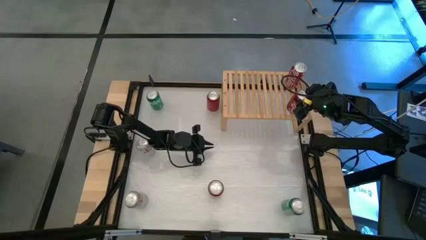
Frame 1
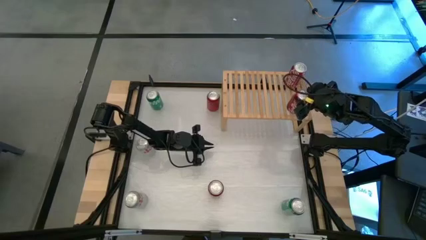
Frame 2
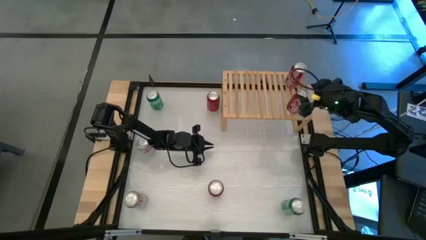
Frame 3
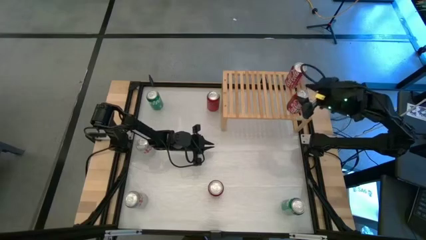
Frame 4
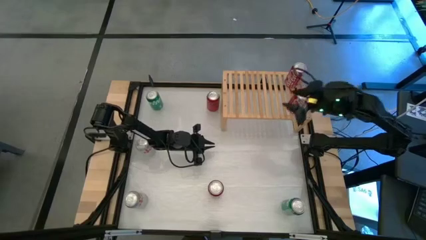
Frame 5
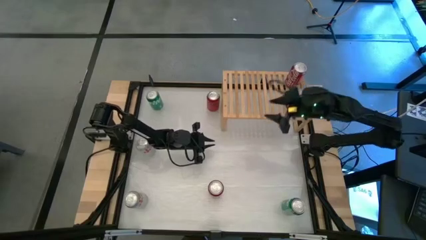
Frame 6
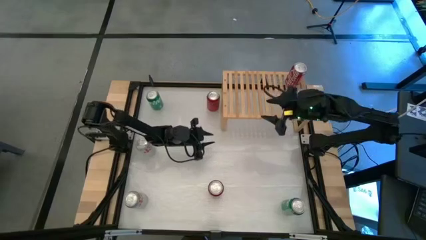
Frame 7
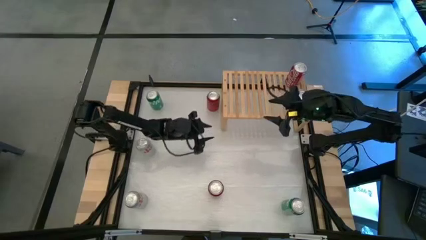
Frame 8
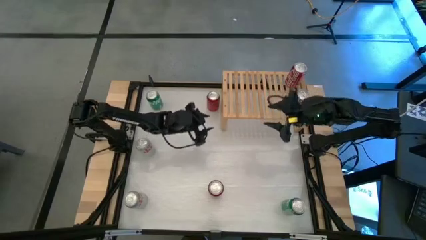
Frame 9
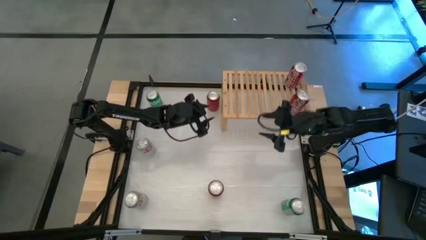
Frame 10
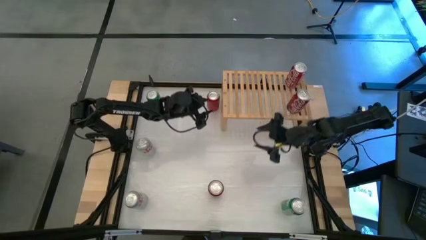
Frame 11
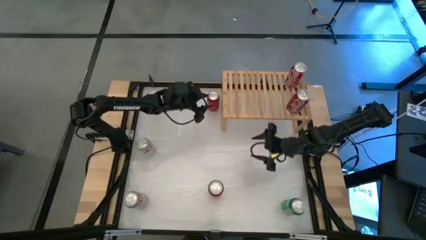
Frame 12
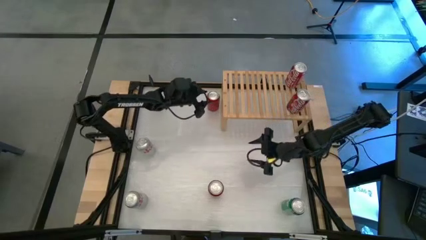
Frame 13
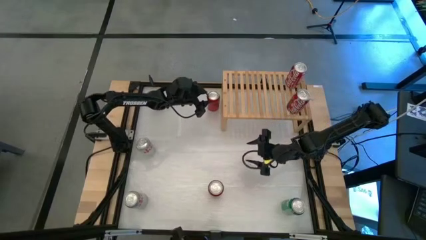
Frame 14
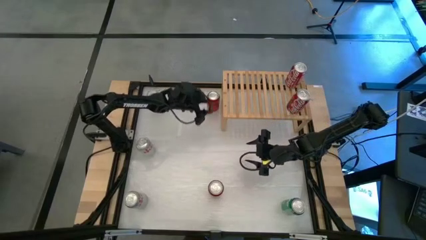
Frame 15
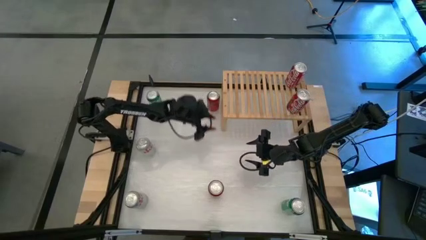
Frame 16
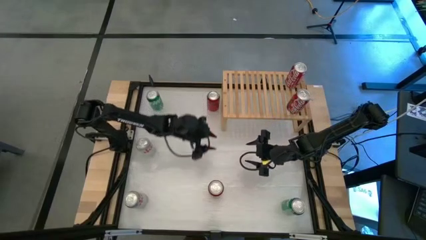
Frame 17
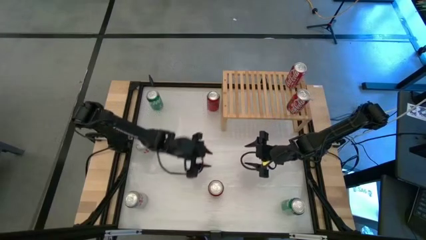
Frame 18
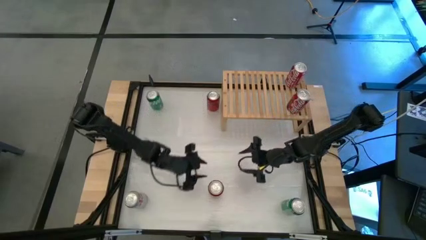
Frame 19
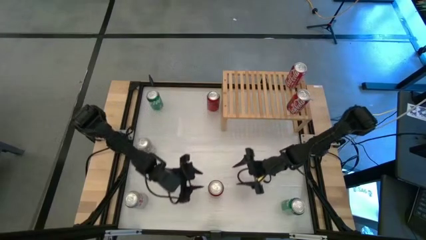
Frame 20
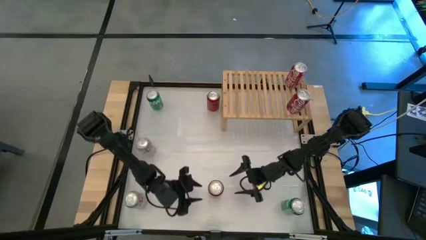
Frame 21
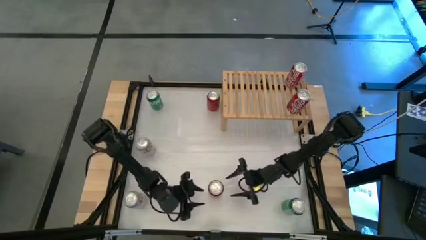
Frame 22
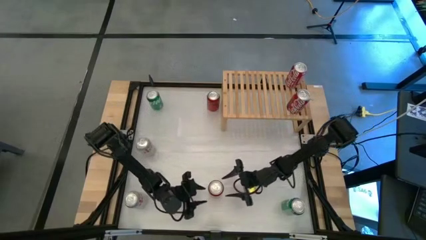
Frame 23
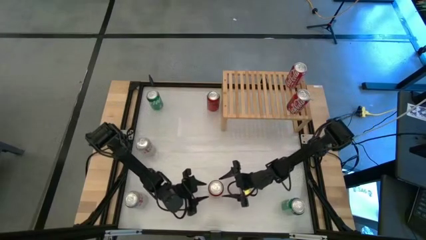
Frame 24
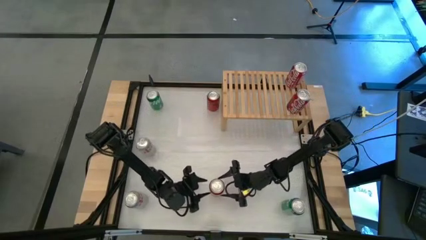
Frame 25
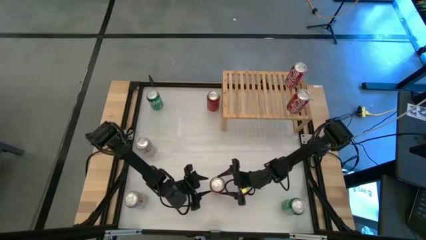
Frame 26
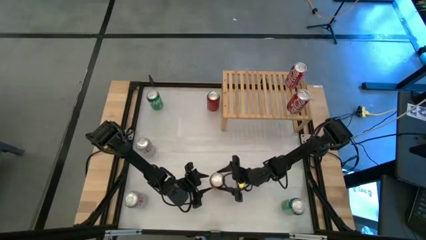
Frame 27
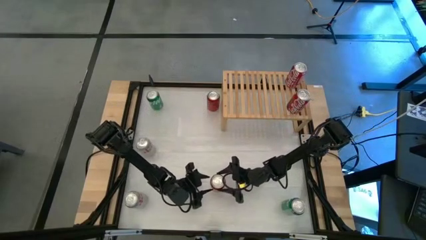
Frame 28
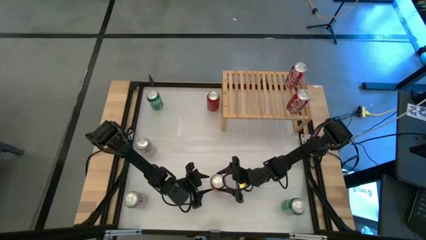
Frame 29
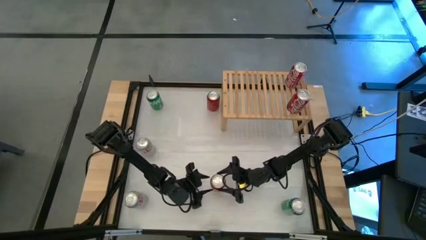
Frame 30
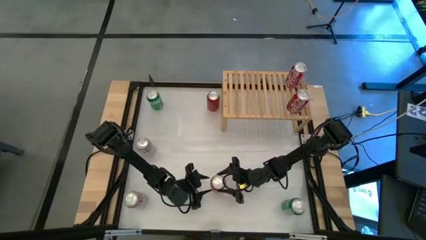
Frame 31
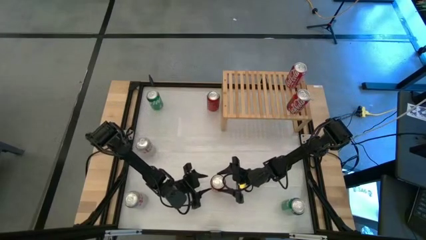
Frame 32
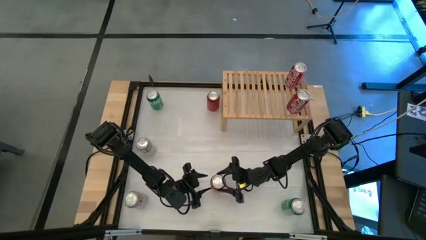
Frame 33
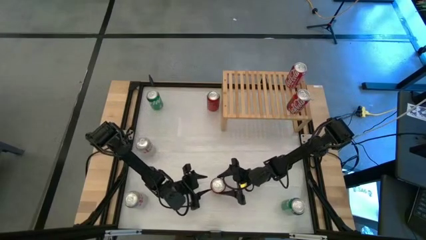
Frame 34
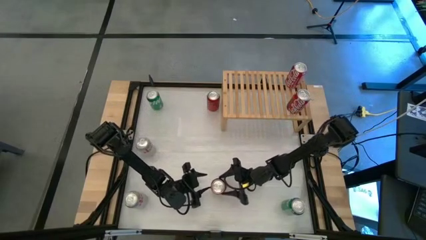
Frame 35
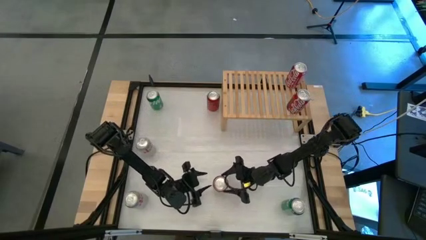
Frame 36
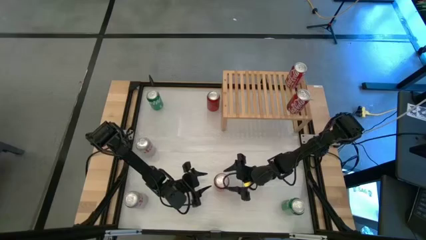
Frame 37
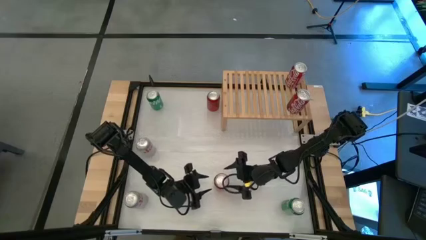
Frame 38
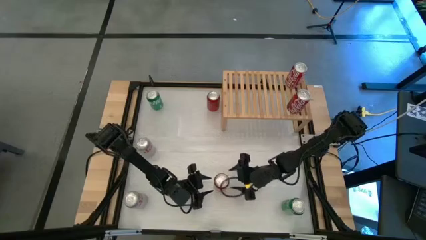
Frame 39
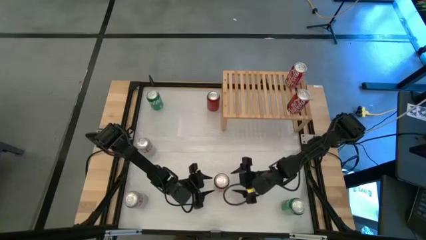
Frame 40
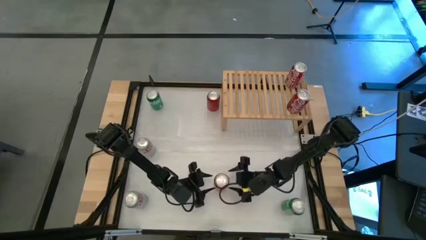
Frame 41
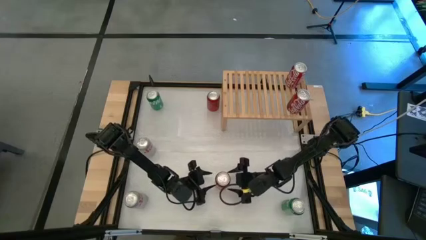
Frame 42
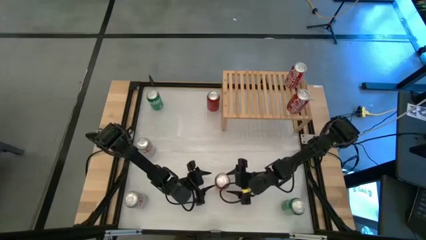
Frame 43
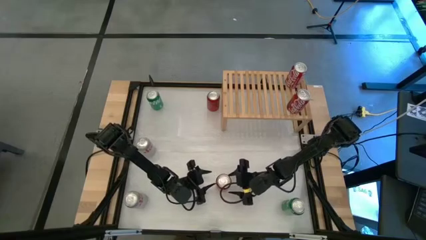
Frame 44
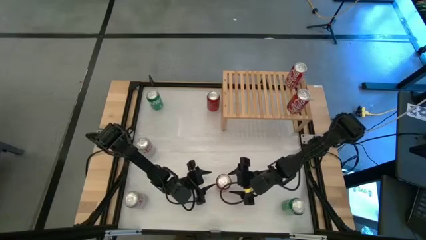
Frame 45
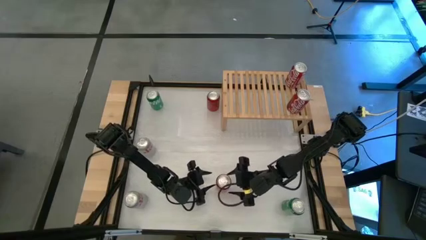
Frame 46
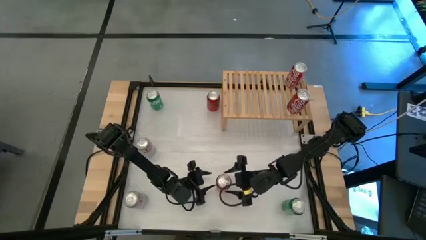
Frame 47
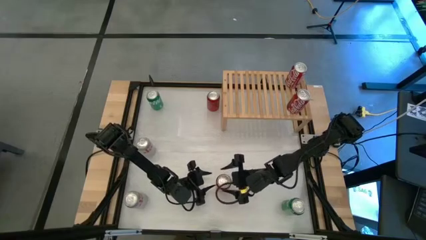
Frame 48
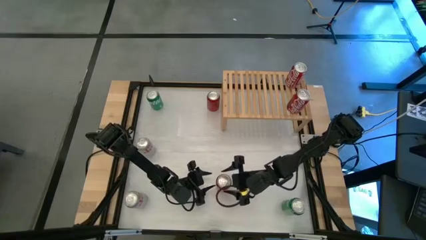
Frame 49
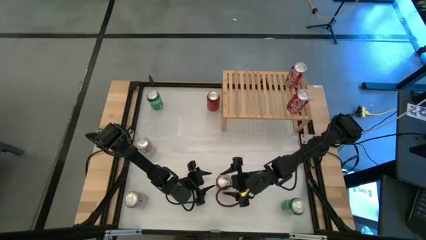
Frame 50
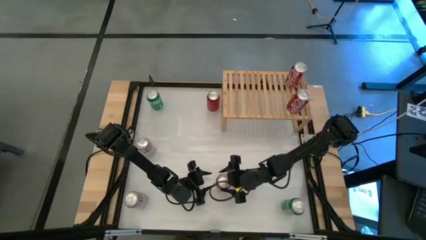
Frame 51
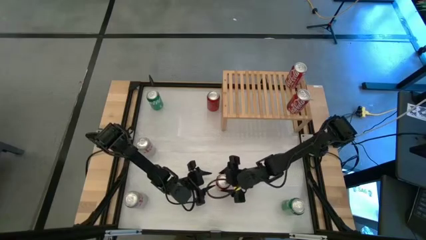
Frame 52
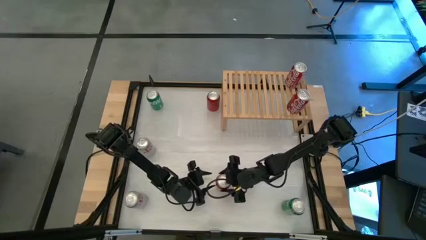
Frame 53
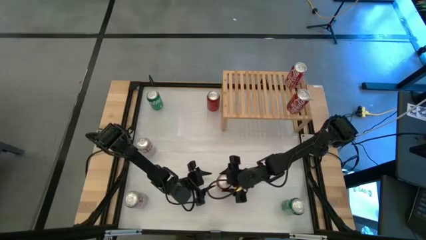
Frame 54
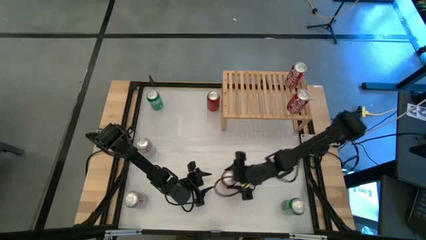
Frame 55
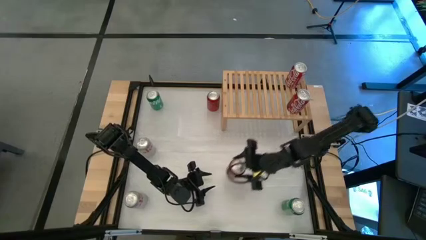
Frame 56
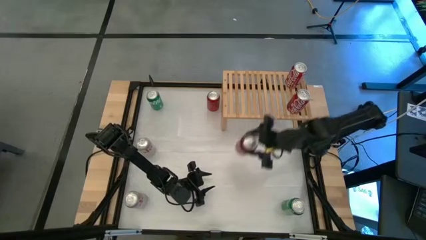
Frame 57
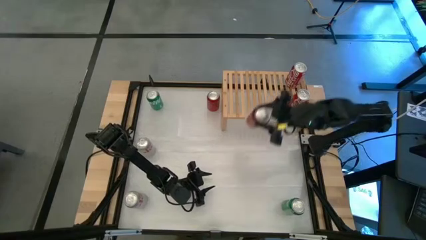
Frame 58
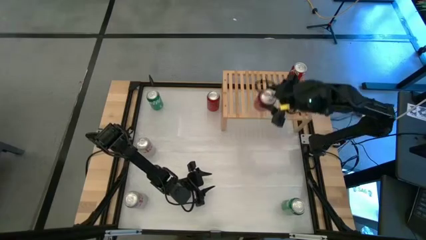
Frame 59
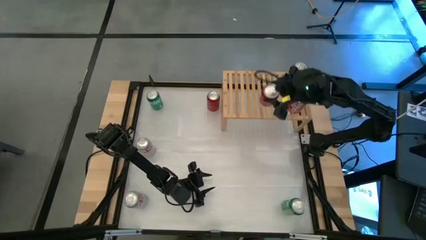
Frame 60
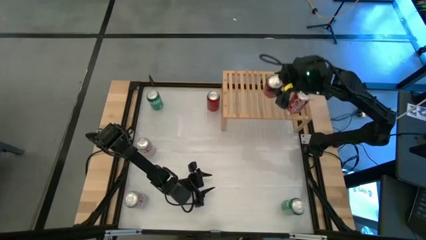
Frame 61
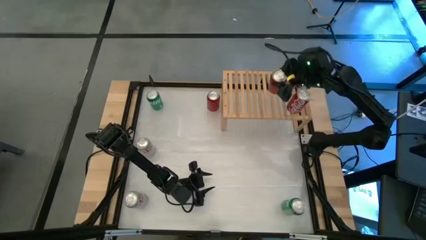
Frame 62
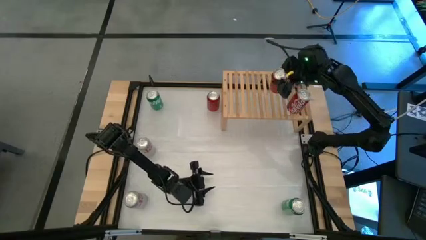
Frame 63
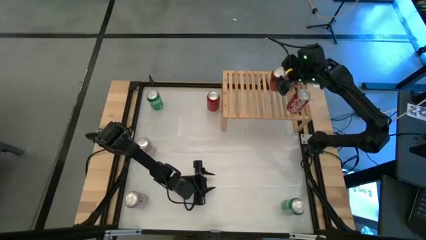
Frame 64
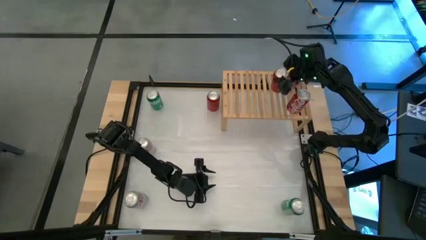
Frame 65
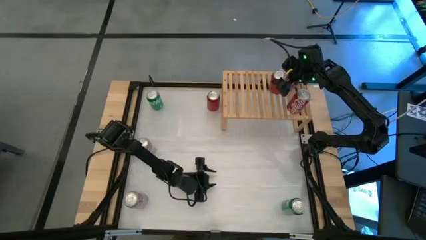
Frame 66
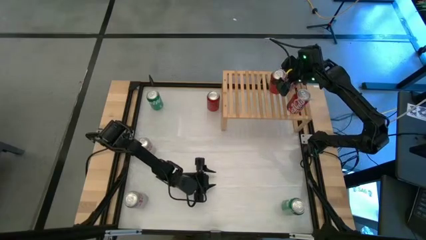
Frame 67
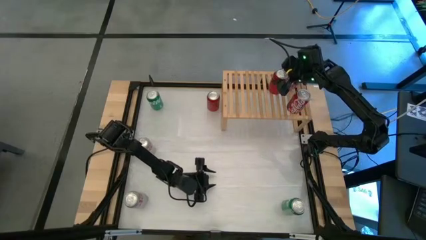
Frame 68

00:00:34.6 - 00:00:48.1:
Task: Place canned beverage on shelf
Put the bottom red black soda can on the shelf
